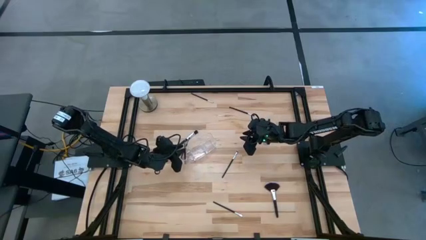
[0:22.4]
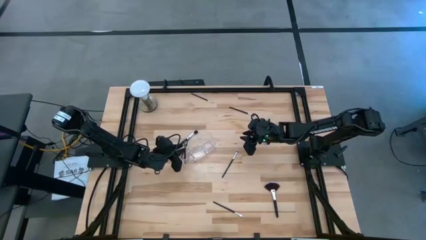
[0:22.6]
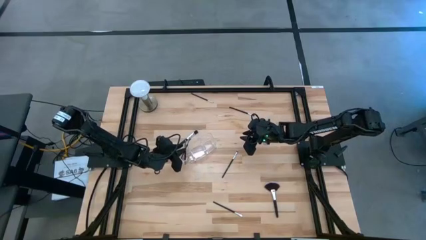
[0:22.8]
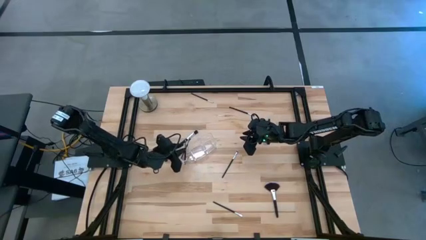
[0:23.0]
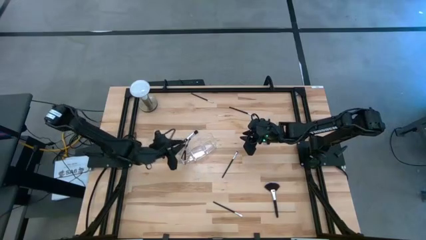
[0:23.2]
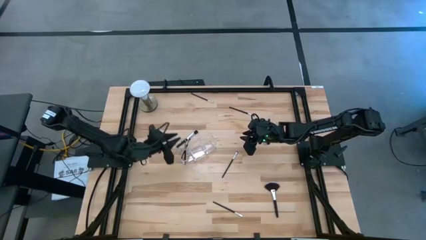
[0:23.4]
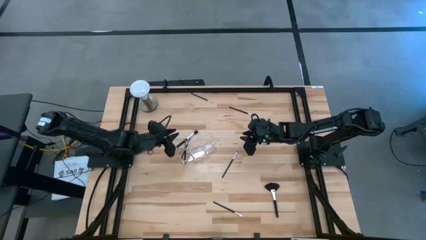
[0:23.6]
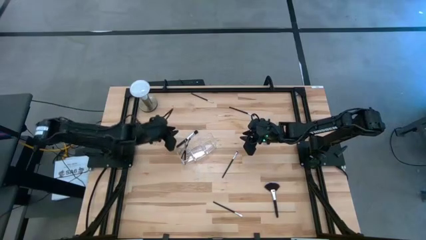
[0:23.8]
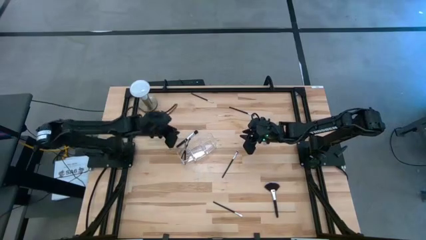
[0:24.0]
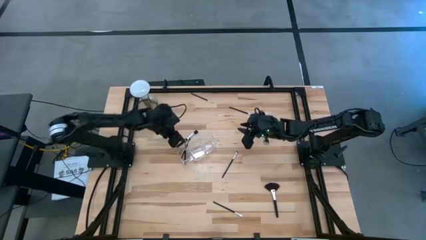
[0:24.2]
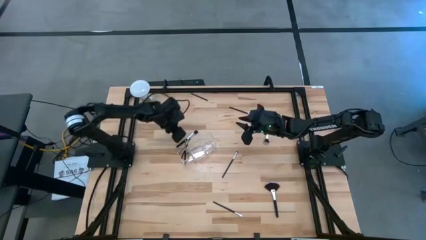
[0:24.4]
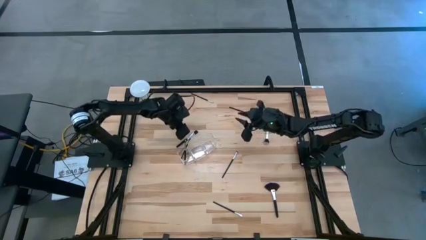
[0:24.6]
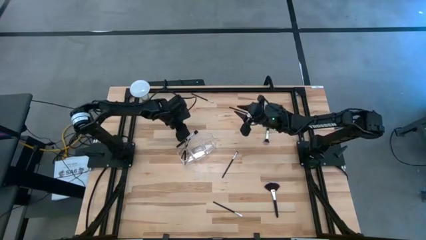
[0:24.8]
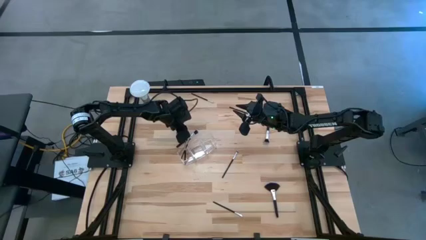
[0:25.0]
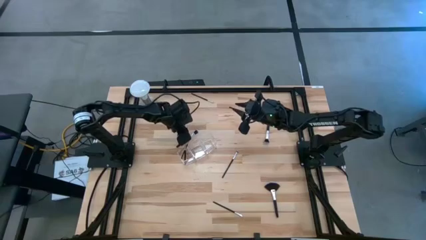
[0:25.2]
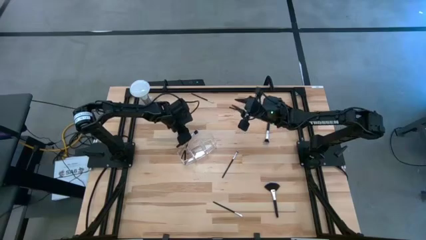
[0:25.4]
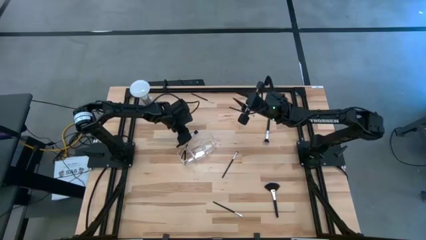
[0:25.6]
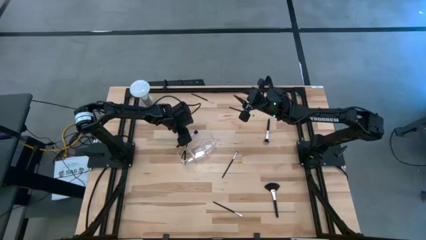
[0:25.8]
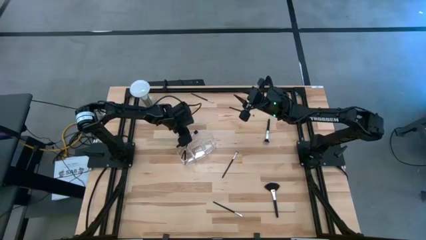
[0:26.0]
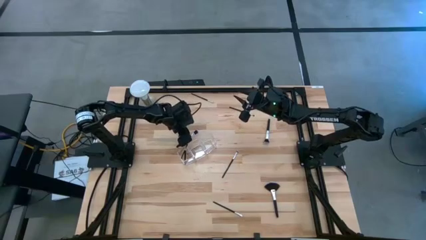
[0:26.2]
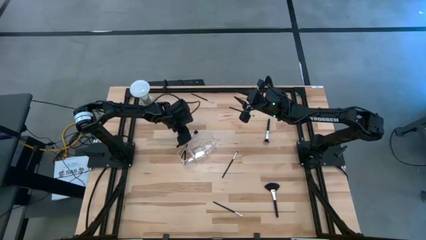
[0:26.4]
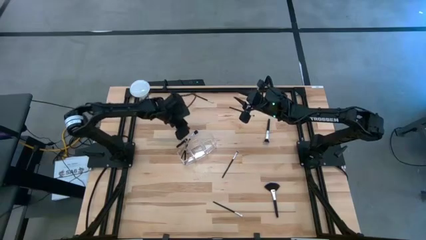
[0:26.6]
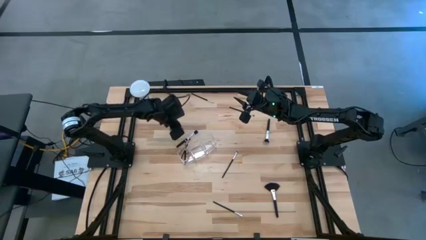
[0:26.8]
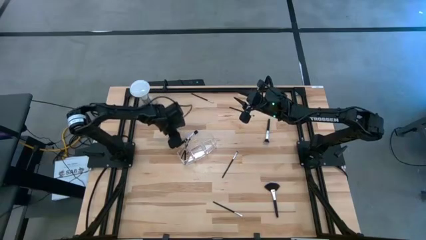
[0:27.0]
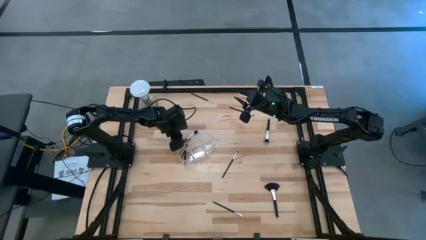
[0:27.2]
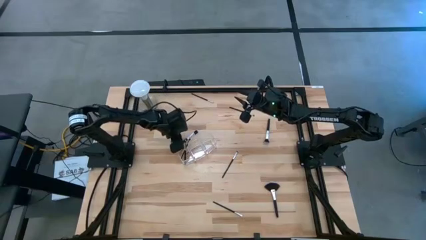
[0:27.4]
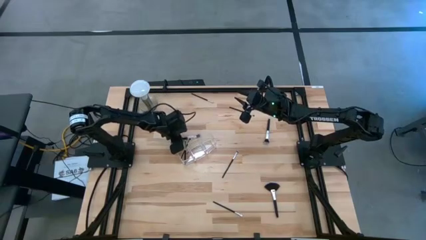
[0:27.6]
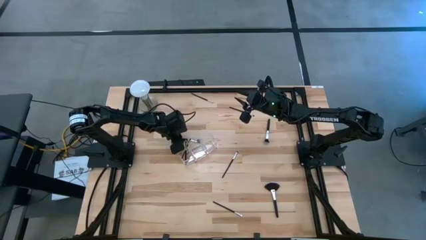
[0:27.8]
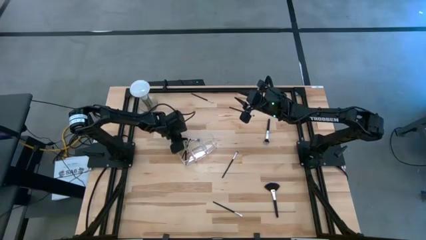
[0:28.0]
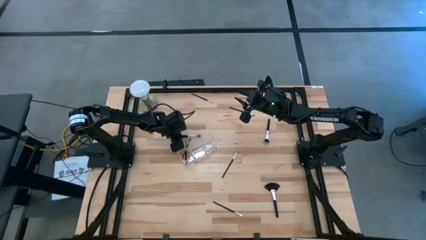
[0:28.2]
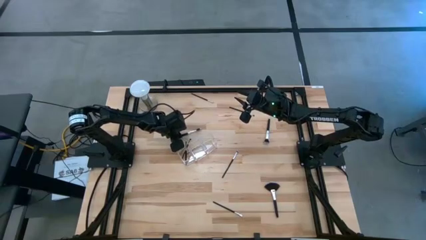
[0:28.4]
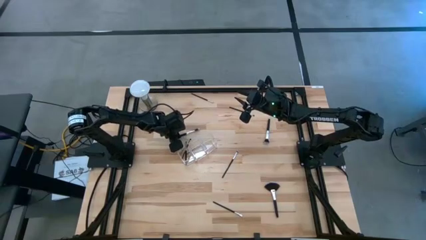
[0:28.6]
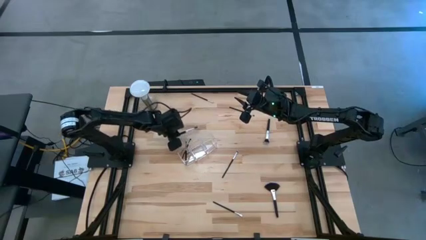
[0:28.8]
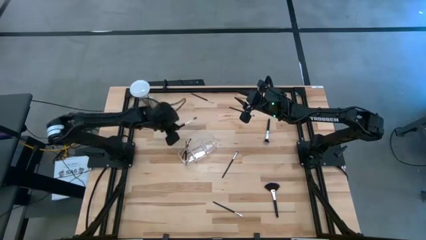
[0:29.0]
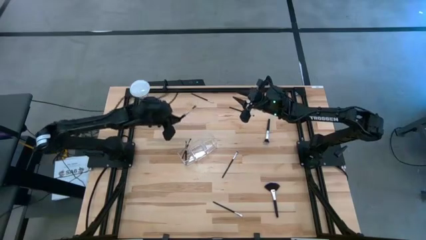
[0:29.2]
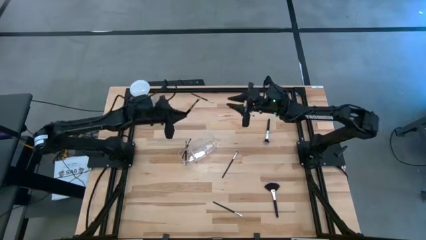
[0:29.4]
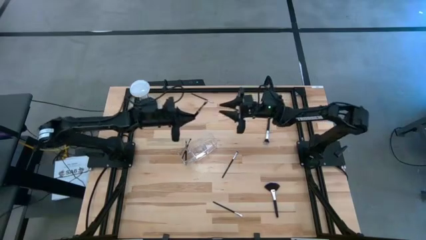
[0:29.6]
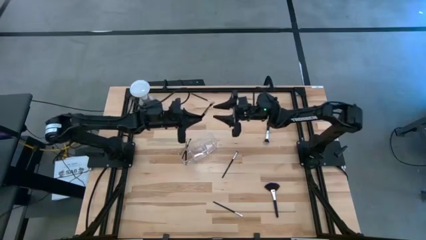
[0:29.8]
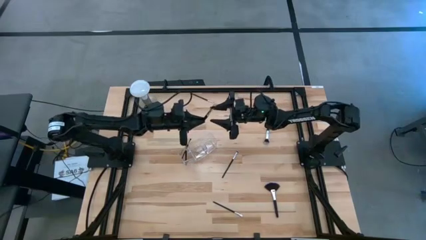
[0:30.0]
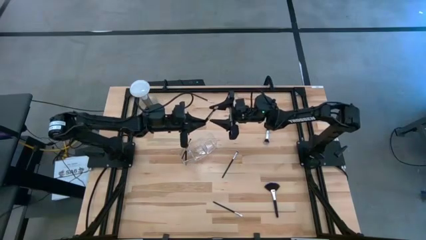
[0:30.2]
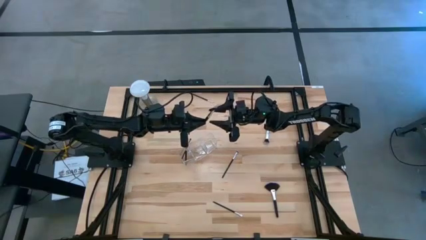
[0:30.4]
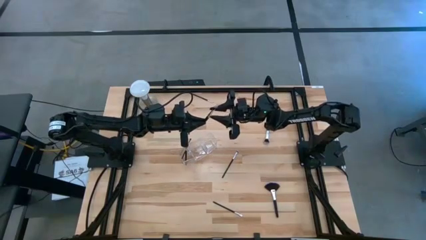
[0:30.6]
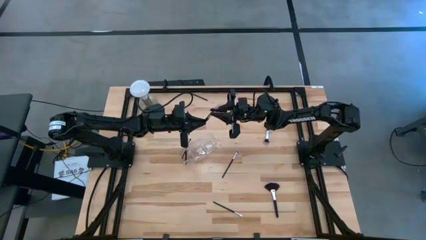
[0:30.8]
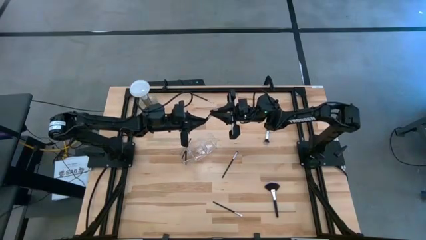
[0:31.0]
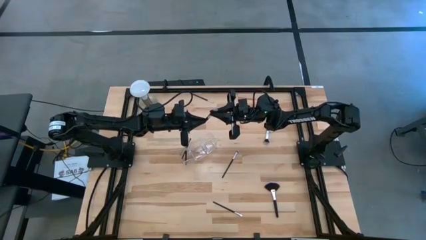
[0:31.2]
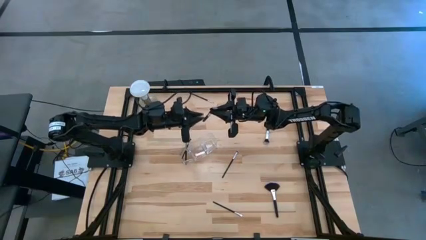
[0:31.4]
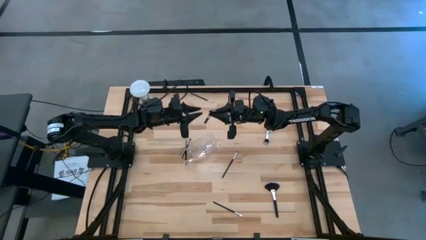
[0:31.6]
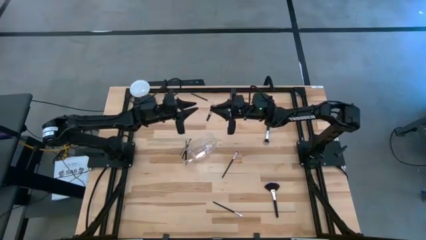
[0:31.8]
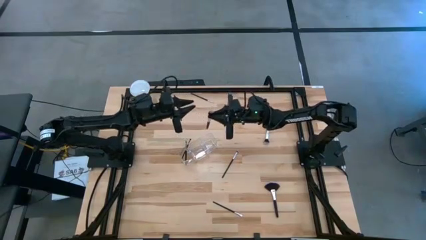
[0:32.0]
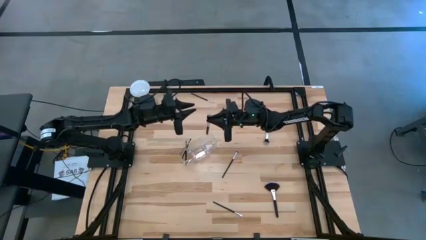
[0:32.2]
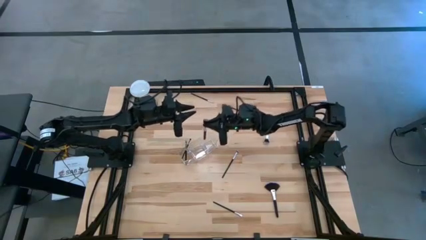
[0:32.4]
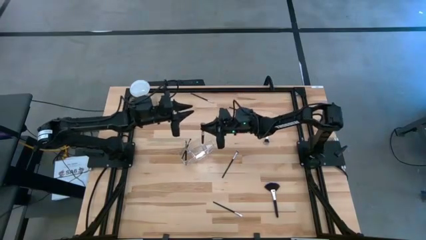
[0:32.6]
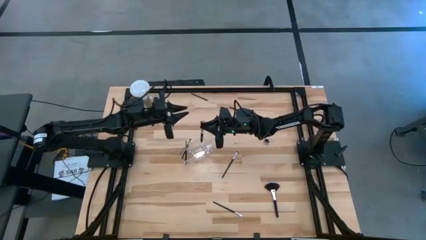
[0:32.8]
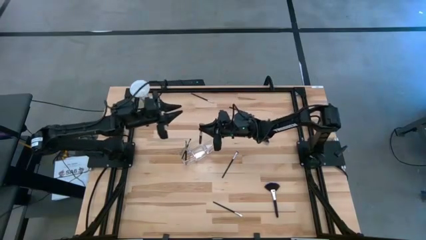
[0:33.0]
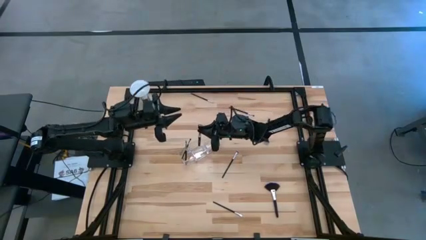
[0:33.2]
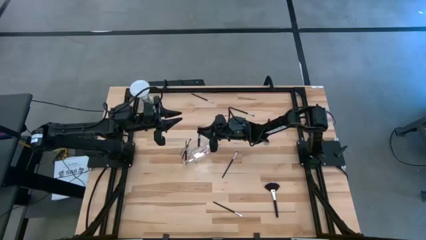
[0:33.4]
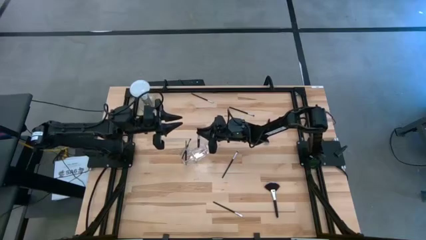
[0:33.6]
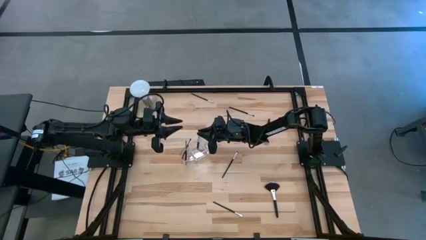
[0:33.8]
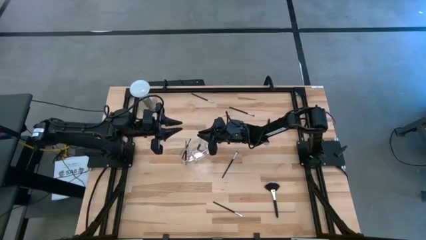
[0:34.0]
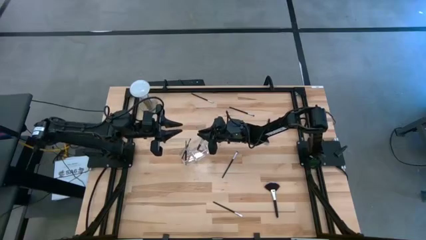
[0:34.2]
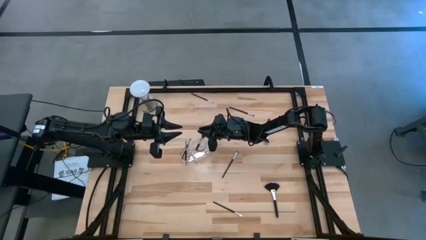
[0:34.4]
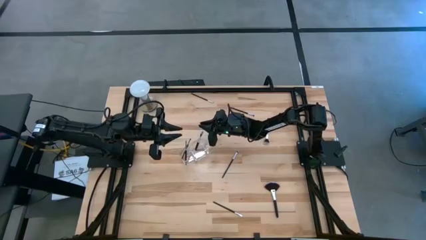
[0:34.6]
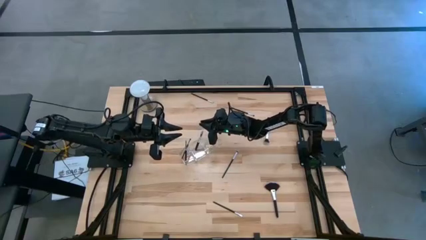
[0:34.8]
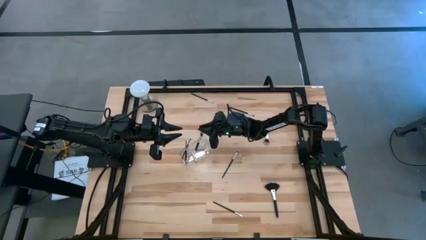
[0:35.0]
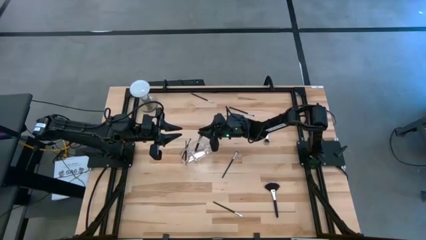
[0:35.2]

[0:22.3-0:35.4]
Task: Put items in baskets/containers
Put the blush brush into the middle section of the transparent organizer

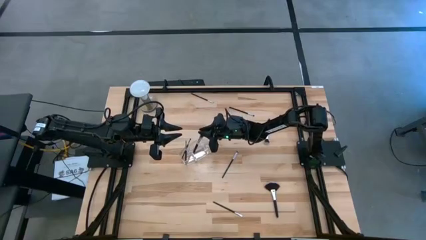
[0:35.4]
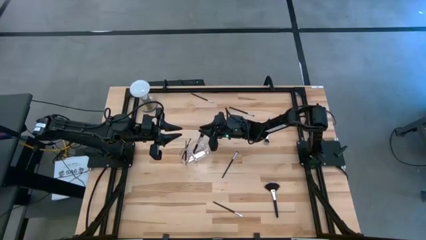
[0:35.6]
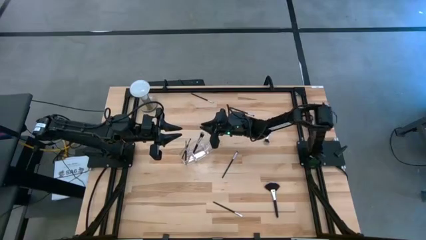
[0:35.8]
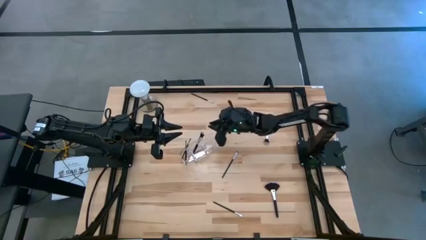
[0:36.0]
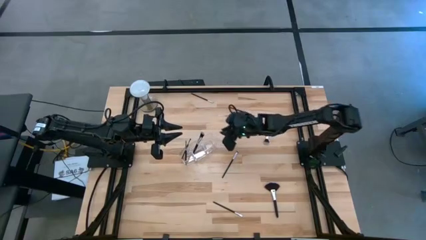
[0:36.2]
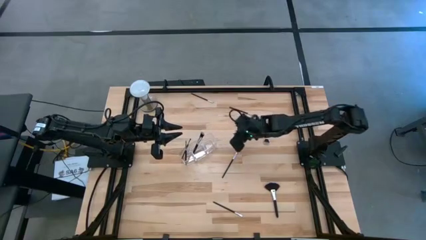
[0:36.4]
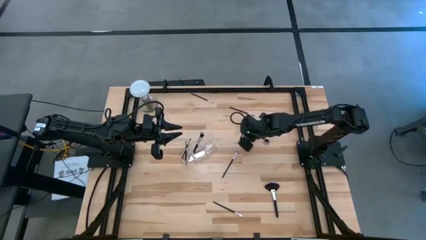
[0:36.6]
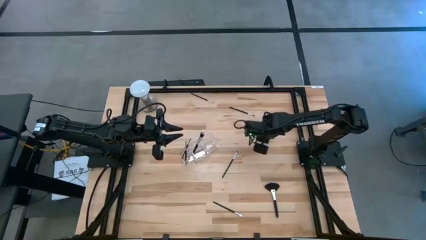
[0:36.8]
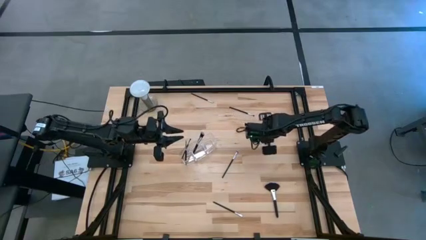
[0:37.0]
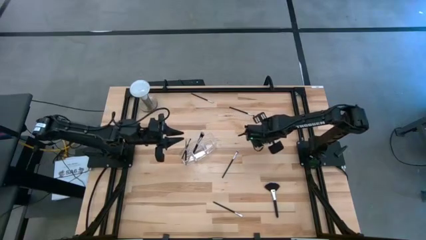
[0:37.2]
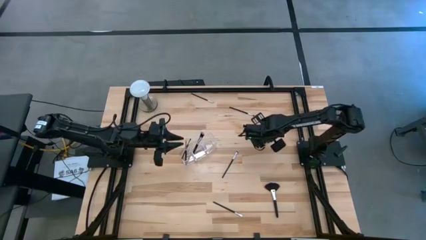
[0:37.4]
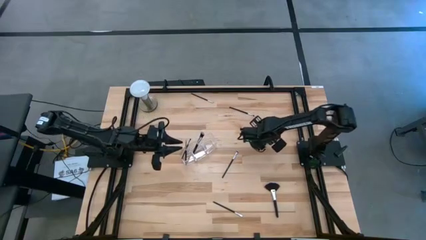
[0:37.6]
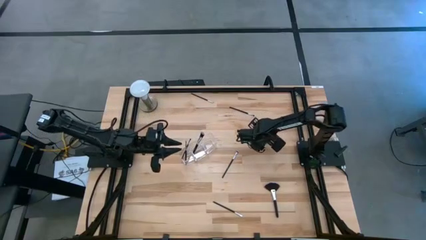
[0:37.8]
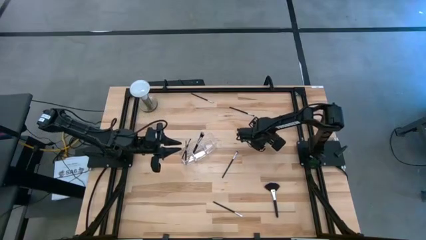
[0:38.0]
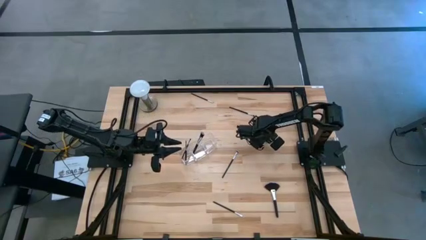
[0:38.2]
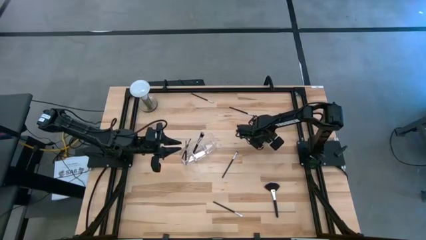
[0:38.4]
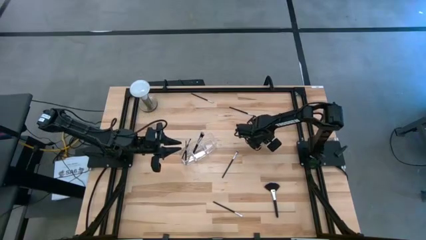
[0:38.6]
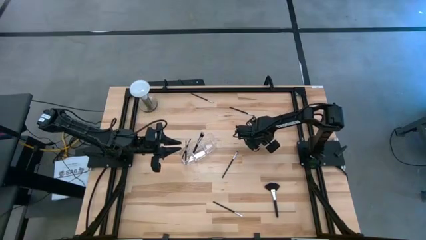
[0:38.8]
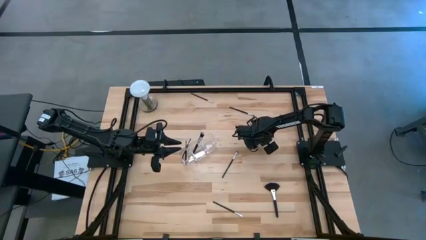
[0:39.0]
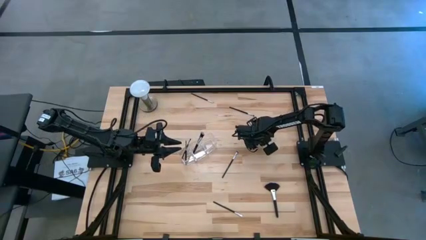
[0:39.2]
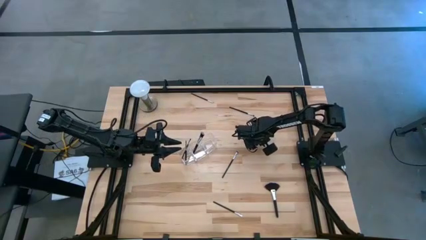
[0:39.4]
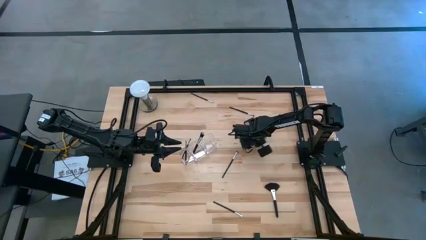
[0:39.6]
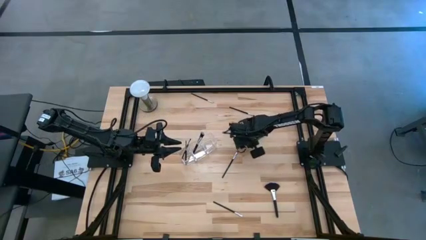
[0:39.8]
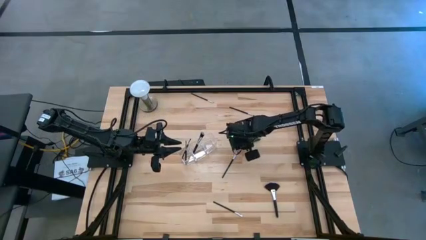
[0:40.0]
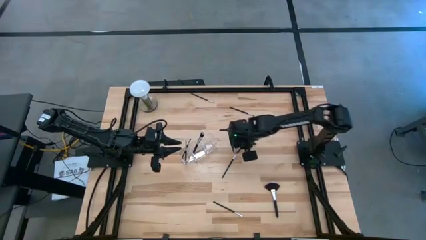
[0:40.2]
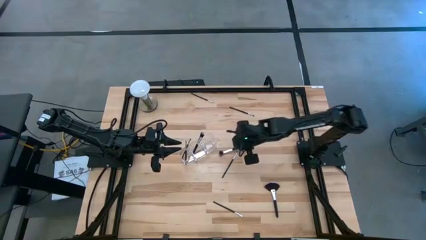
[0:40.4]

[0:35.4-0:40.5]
Put the powder brush into the middle section of the transparent organizer
